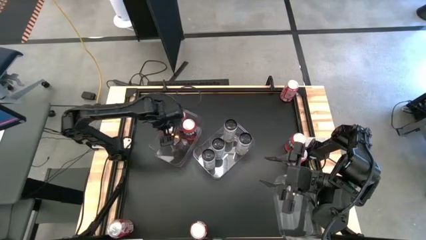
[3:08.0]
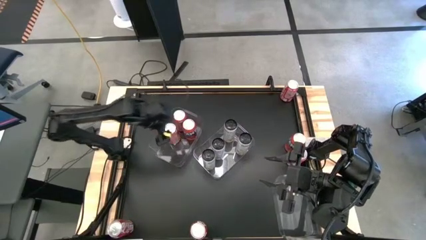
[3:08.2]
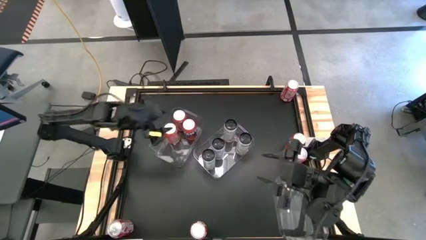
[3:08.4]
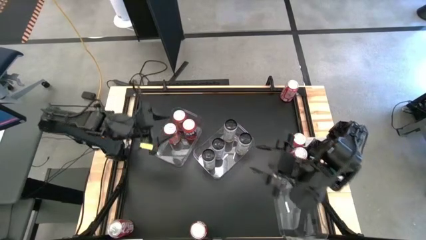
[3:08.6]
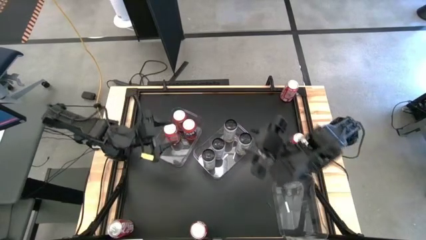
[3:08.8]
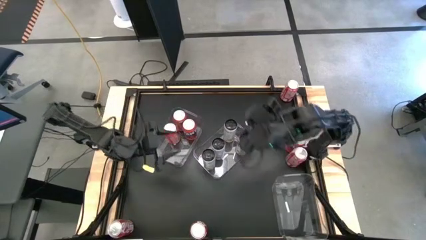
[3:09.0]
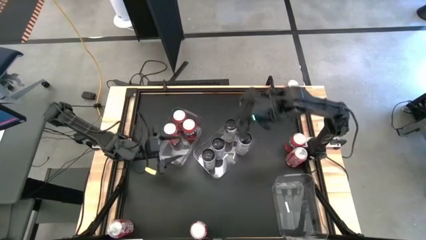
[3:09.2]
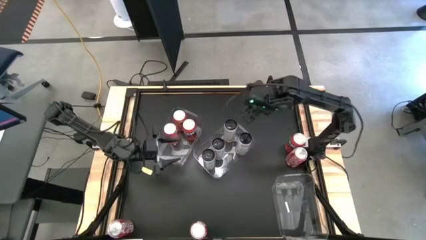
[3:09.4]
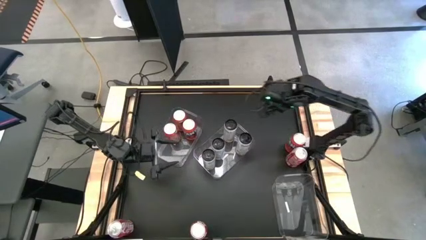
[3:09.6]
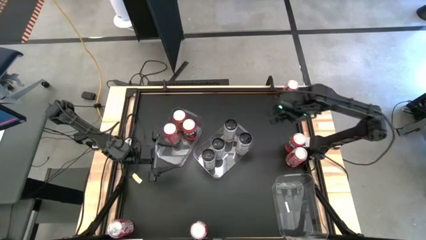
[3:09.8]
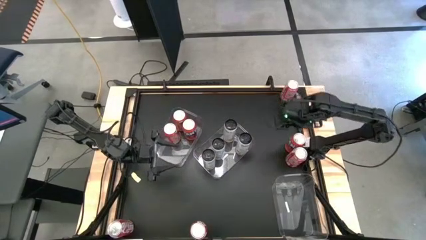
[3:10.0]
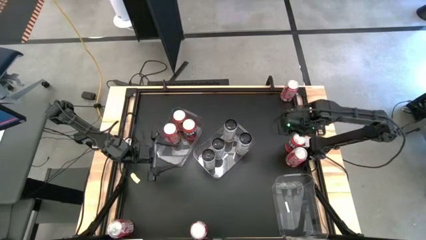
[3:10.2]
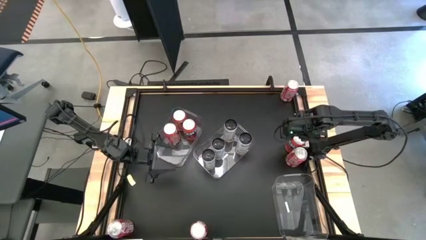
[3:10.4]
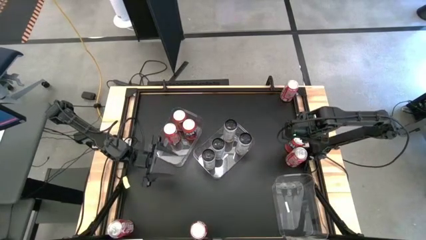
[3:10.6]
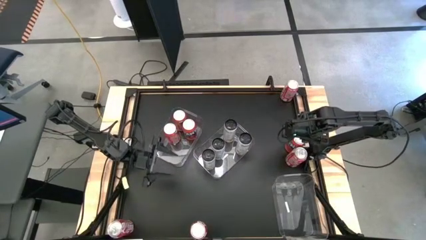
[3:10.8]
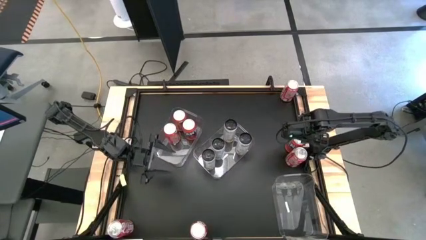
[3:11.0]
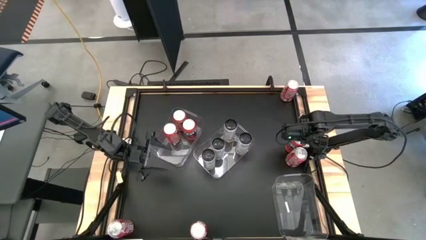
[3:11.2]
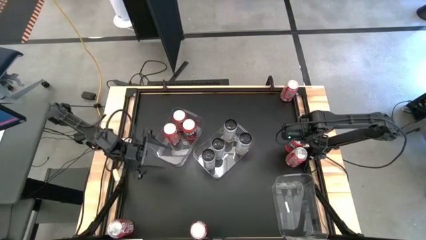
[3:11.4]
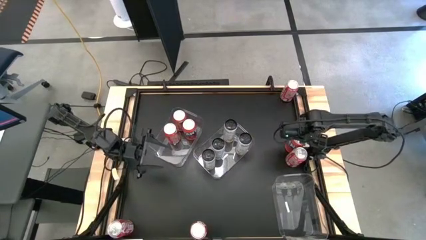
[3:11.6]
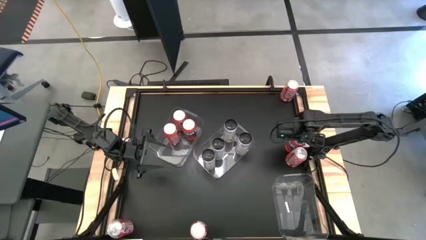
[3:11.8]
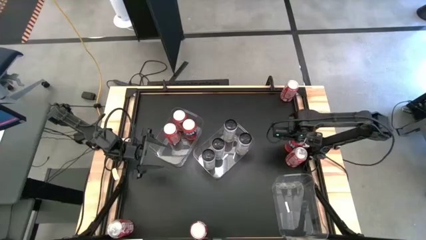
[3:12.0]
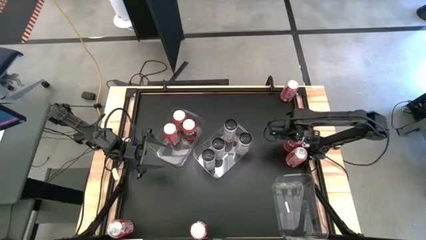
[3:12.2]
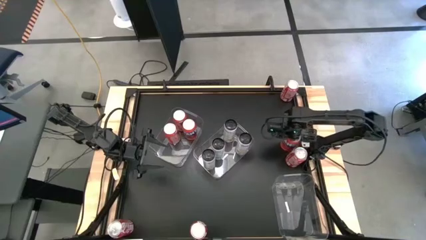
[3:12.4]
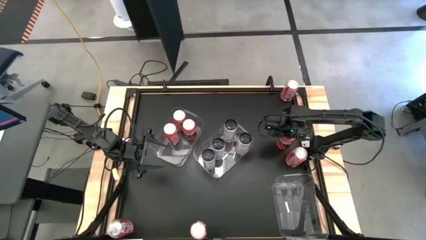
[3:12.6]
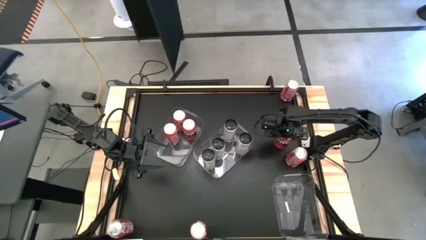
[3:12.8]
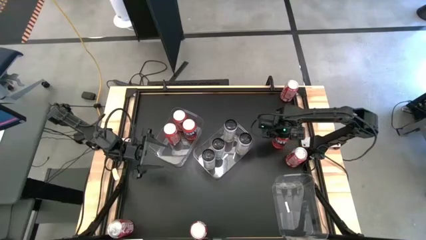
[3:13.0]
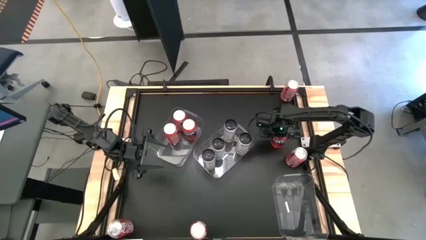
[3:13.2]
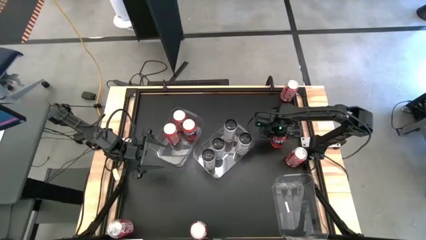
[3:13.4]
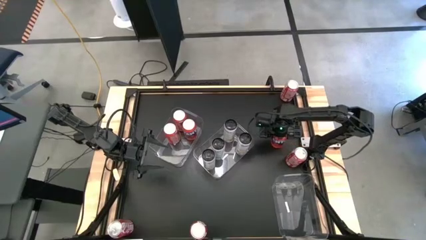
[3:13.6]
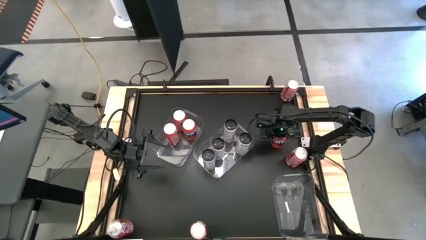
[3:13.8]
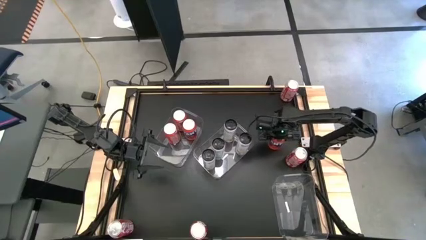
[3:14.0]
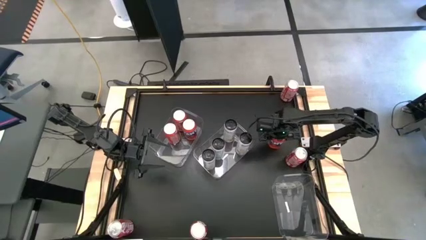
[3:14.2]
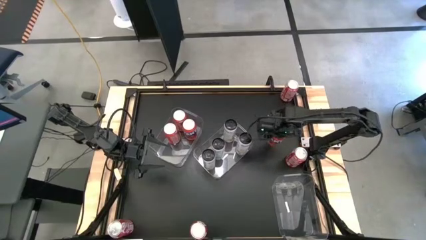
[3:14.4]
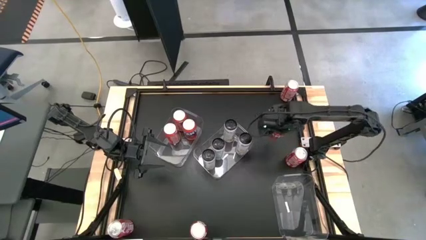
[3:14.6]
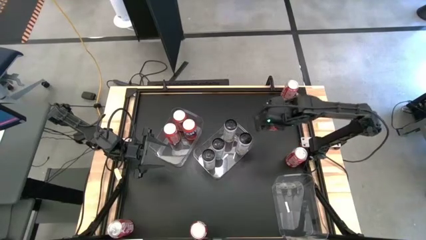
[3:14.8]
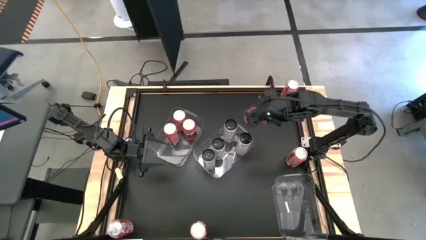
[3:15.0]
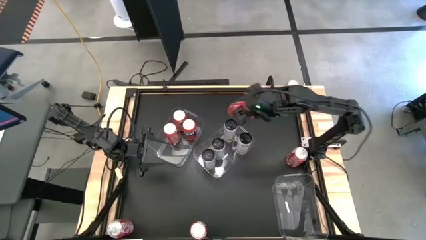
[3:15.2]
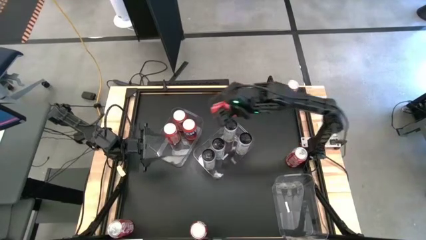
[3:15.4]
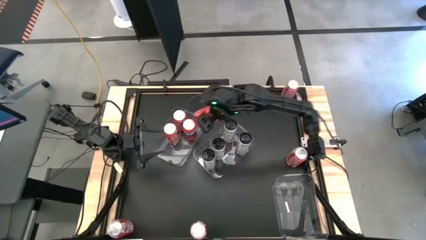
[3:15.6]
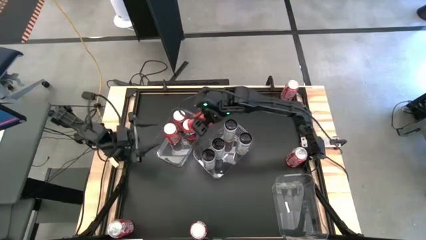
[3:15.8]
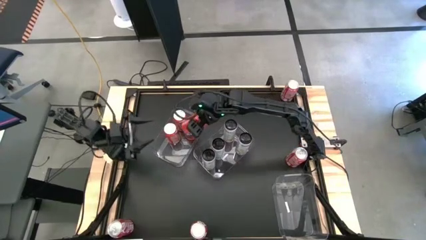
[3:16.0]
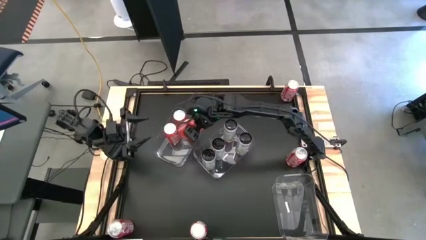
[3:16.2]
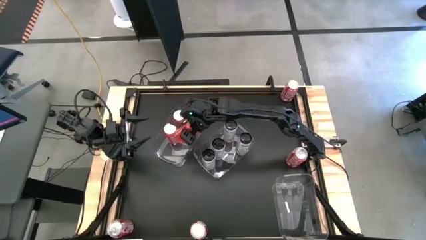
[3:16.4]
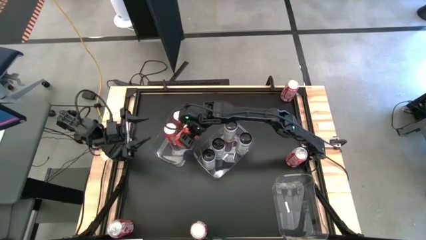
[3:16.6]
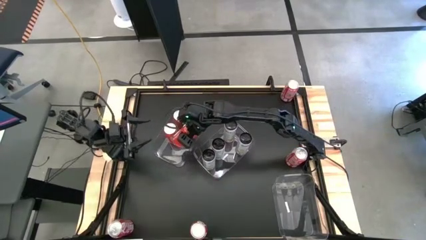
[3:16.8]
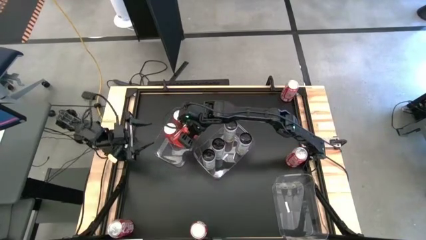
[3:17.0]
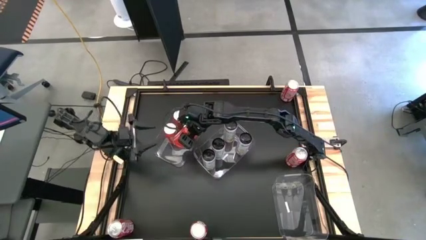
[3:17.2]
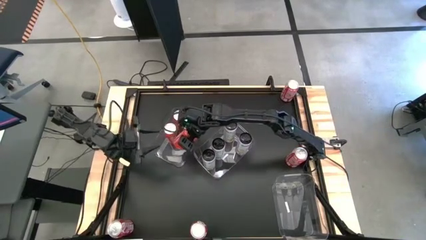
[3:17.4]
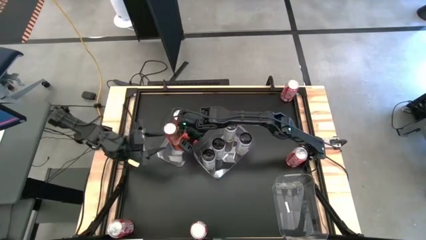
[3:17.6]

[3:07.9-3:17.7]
Task: Sort soda cans
Put the orange soda can into the left transparent bin

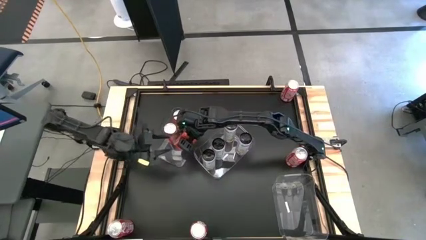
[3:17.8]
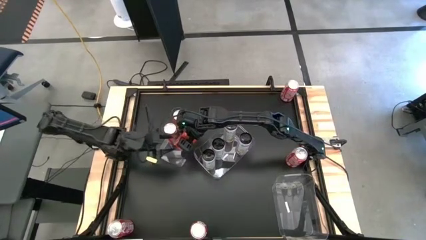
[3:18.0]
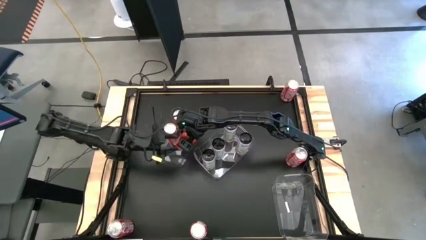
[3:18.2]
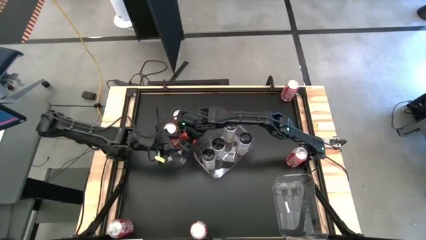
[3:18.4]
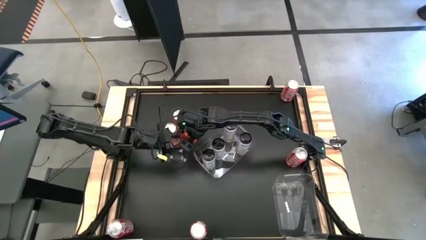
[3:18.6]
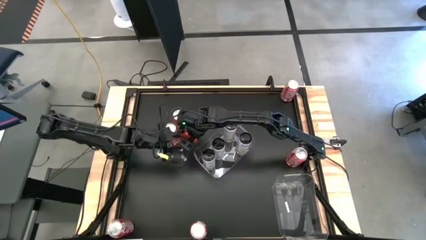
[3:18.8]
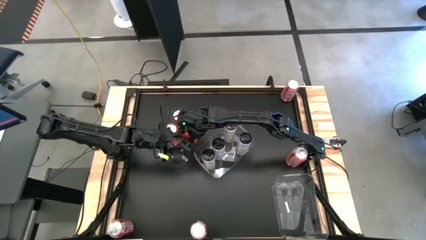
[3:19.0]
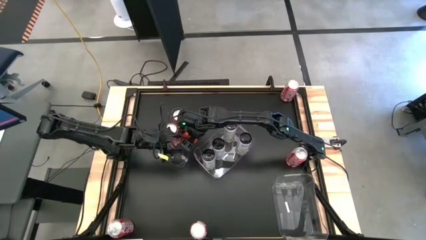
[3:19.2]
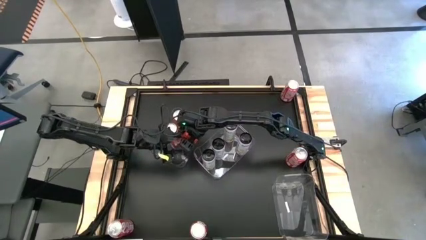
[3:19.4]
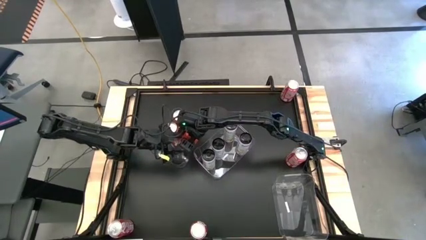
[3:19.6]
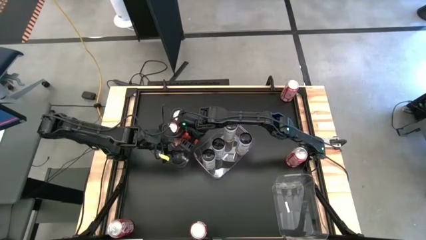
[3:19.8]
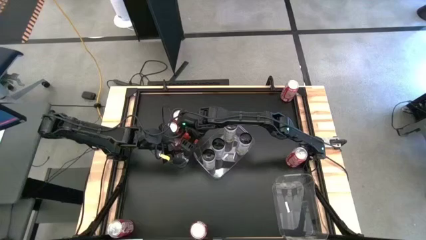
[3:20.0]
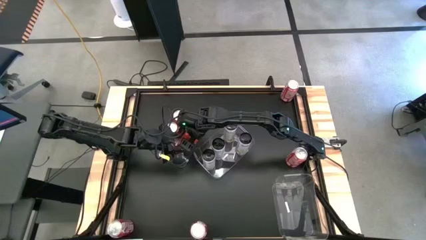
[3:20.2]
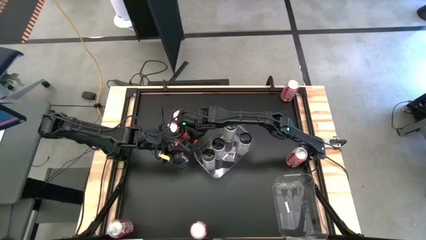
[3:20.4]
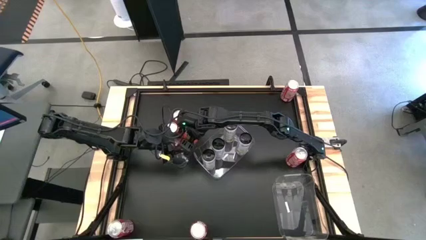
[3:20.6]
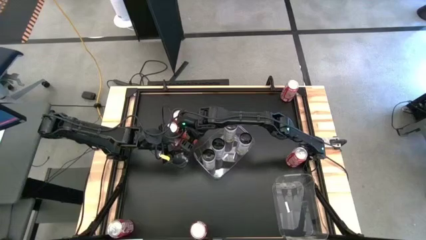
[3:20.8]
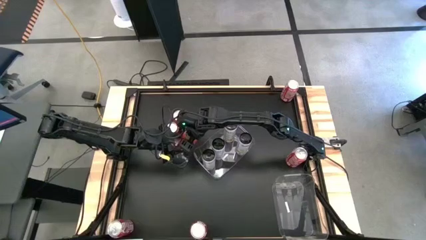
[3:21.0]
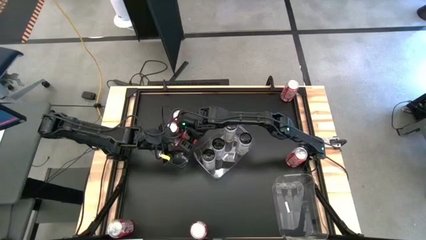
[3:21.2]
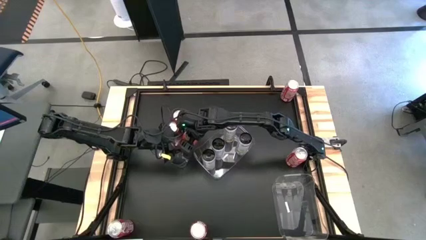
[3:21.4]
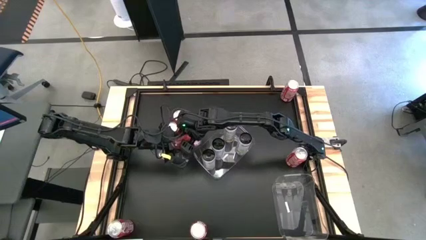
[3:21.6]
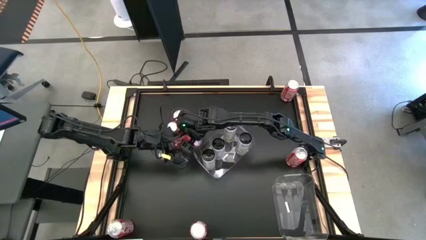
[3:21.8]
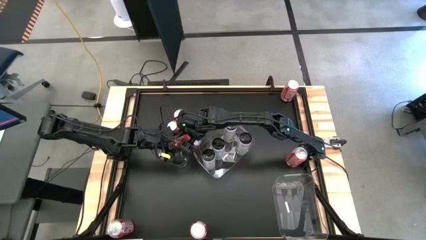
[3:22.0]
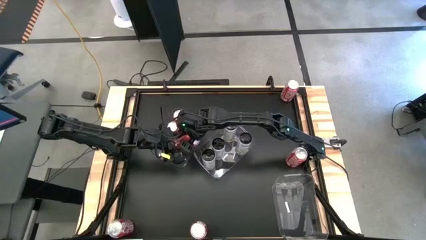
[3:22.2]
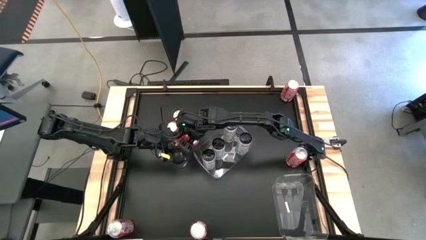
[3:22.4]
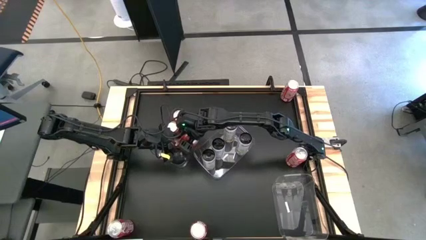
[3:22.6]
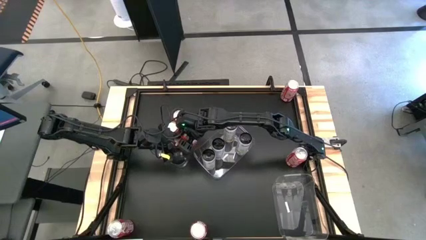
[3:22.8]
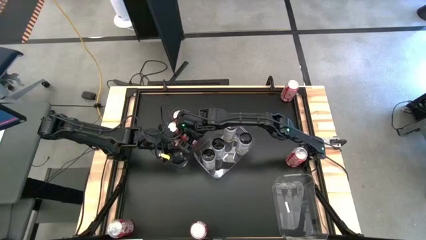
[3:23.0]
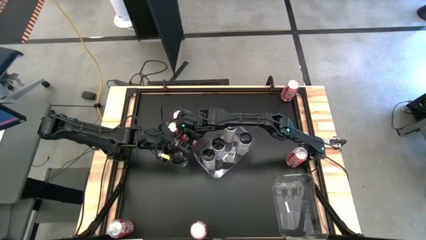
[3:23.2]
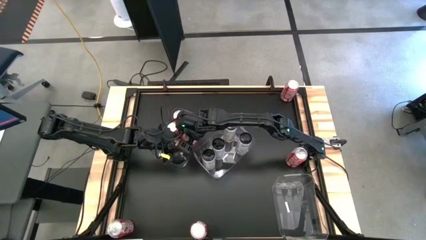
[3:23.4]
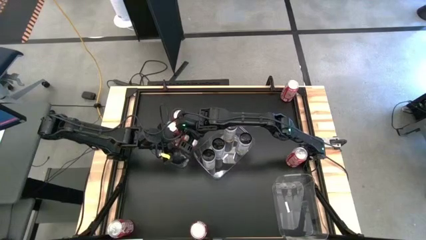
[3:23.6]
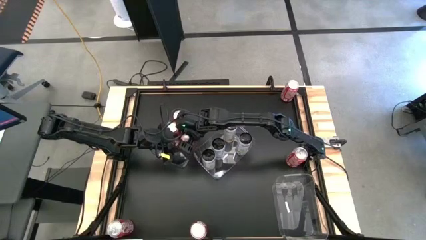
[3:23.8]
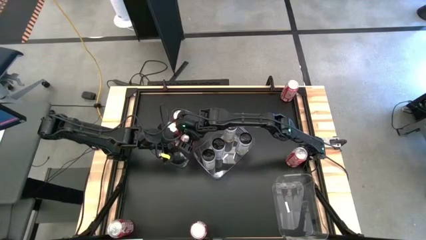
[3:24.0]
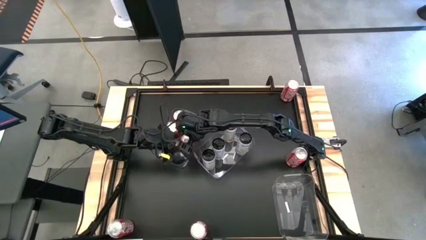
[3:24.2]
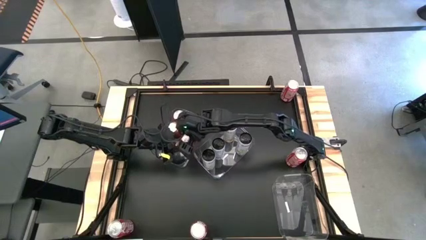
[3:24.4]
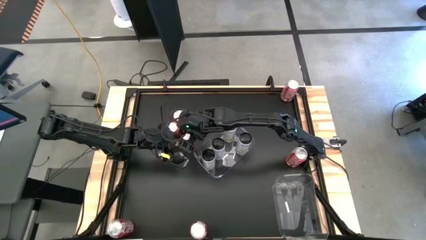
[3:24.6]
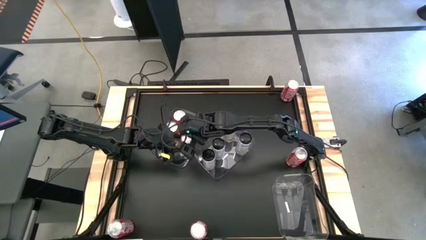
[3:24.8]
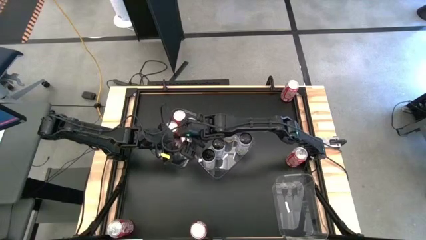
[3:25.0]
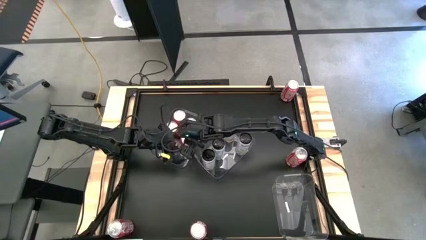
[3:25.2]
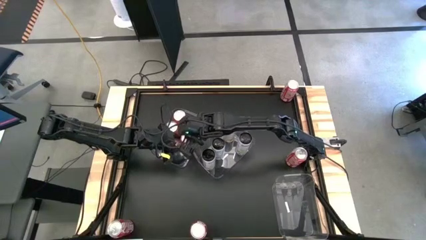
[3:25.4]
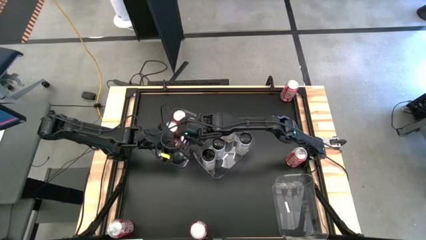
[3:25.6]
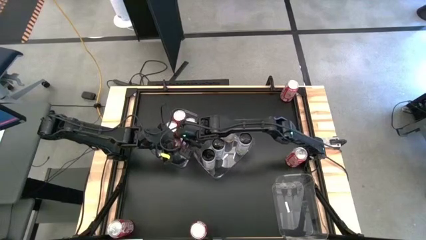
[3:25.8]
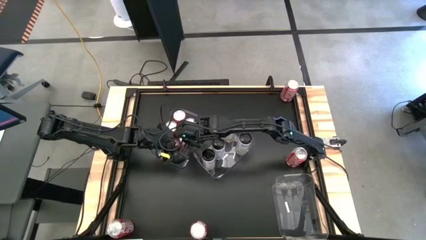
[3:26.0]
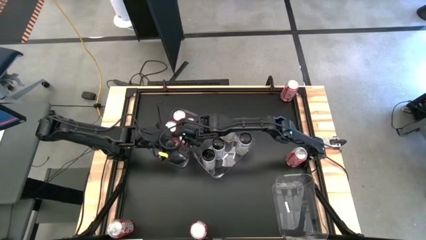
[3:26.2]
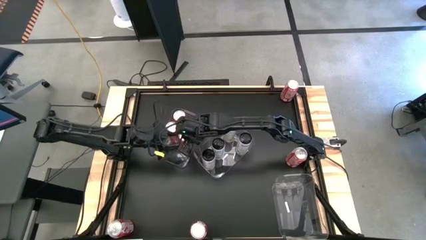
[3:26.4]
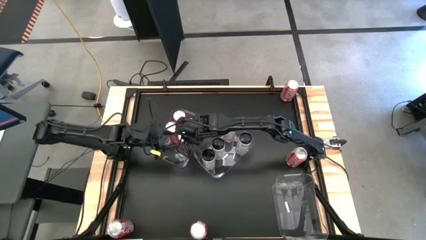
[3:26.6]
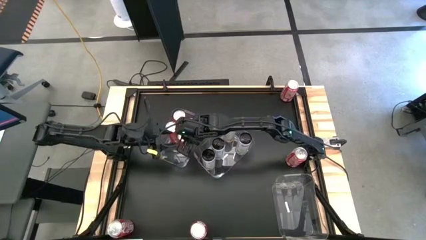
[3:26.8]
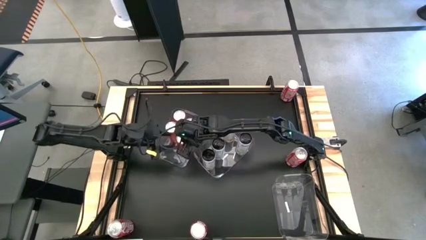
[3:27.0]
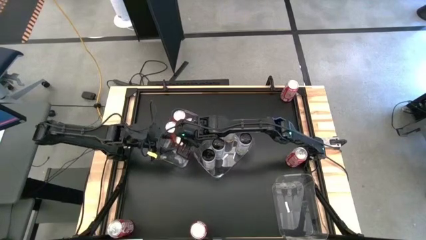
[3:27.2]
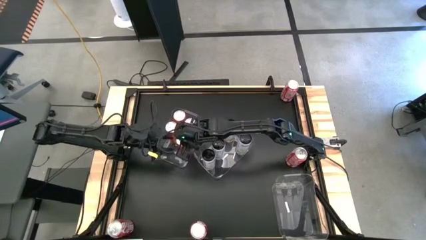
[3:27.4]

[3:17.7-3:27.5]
Put the orange soda can into the left transparent bin
